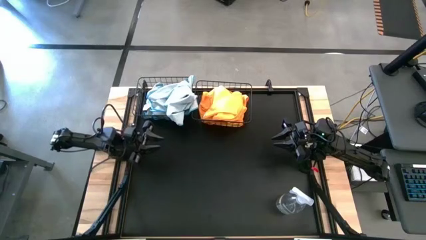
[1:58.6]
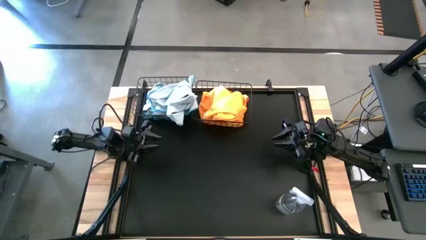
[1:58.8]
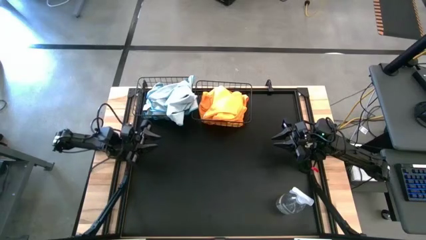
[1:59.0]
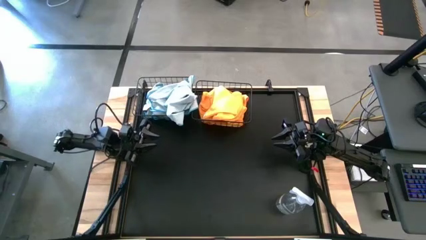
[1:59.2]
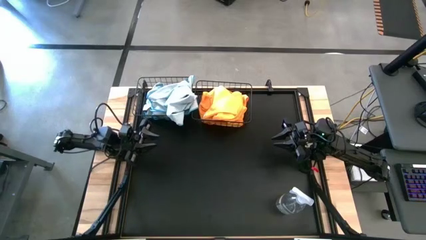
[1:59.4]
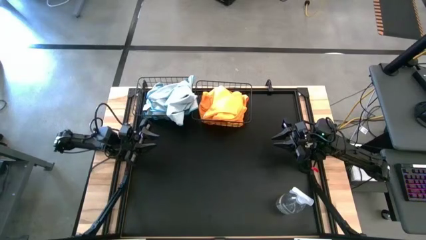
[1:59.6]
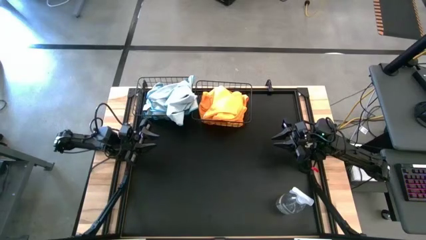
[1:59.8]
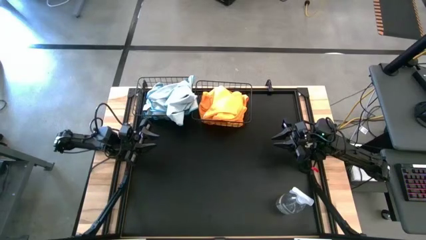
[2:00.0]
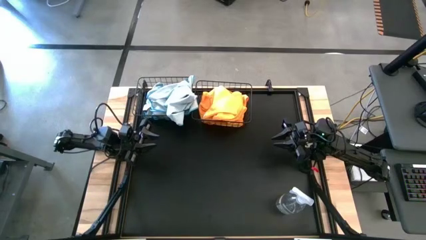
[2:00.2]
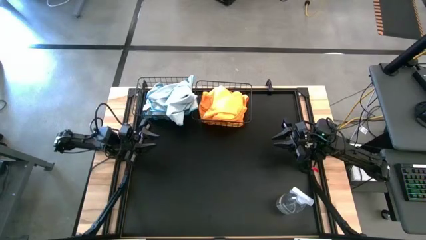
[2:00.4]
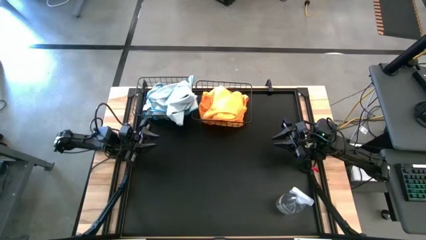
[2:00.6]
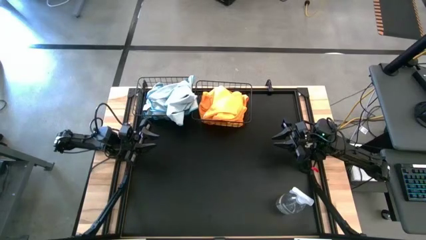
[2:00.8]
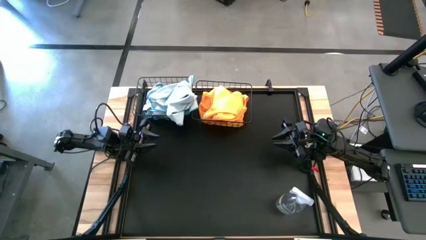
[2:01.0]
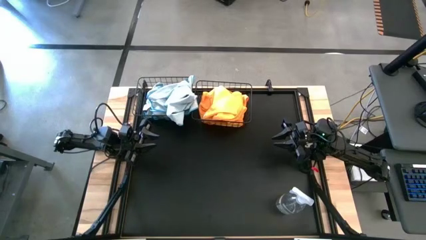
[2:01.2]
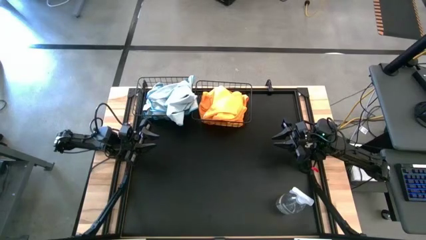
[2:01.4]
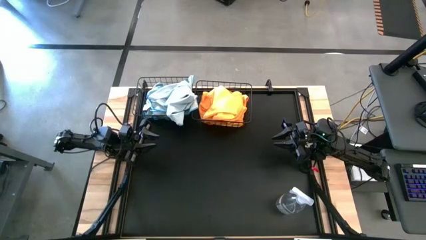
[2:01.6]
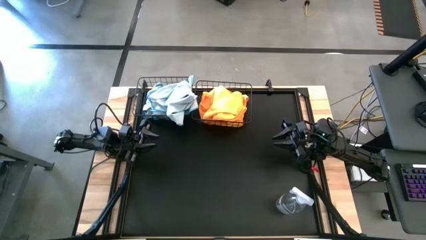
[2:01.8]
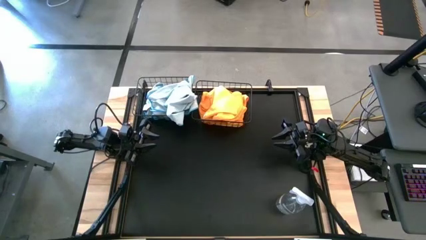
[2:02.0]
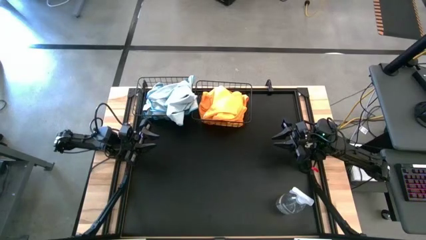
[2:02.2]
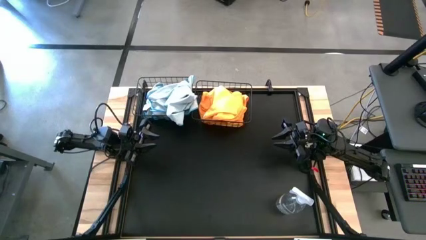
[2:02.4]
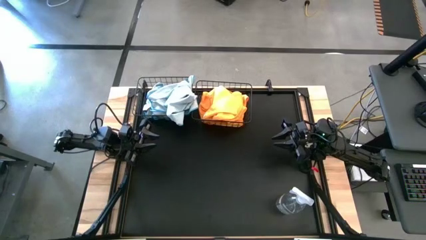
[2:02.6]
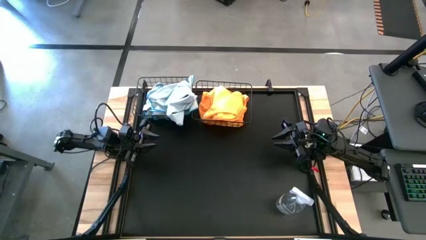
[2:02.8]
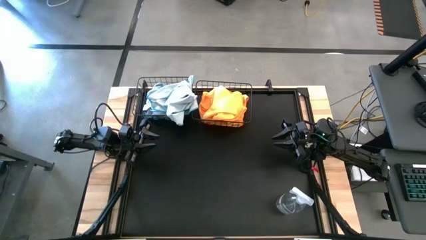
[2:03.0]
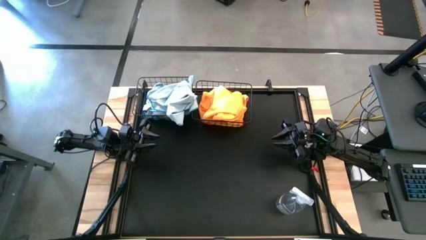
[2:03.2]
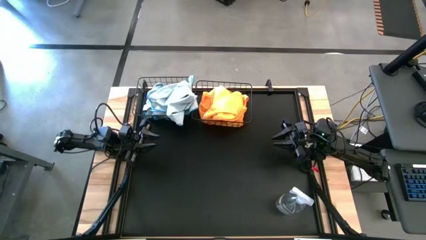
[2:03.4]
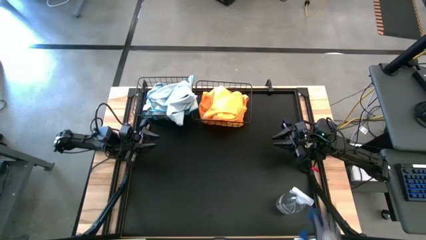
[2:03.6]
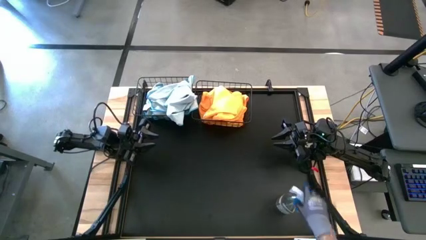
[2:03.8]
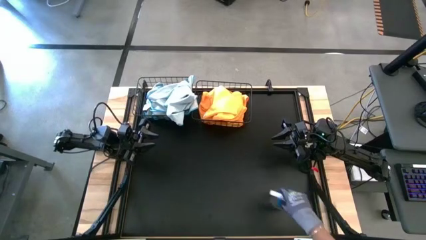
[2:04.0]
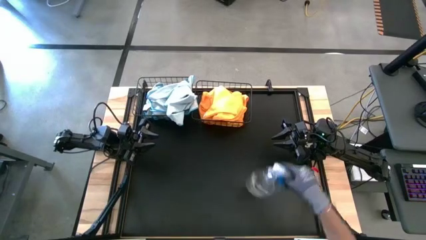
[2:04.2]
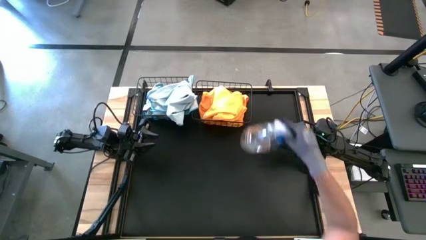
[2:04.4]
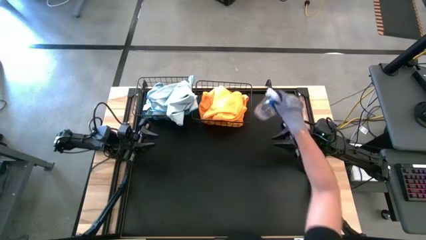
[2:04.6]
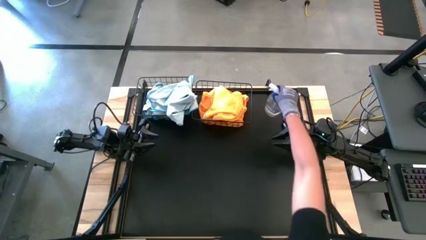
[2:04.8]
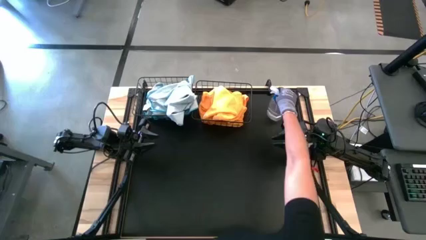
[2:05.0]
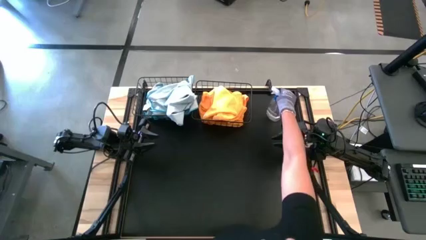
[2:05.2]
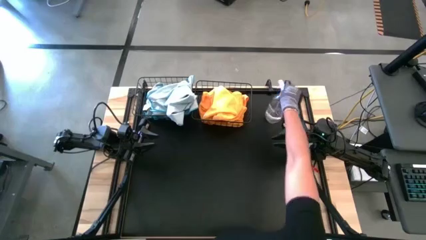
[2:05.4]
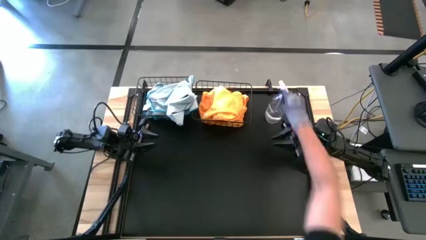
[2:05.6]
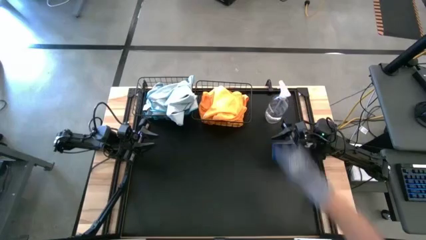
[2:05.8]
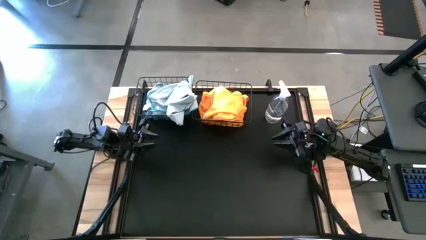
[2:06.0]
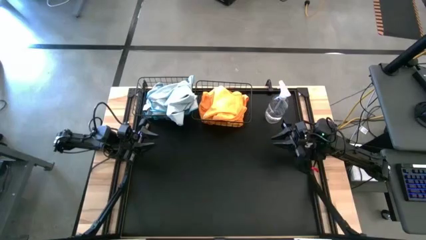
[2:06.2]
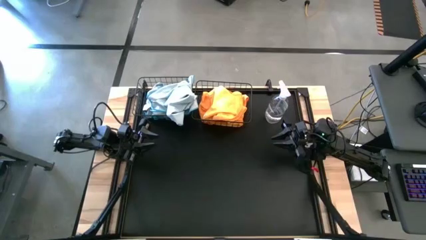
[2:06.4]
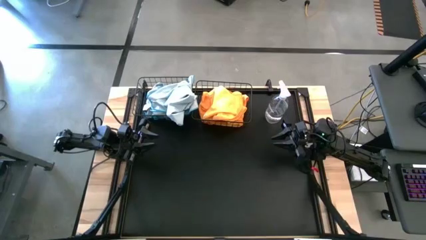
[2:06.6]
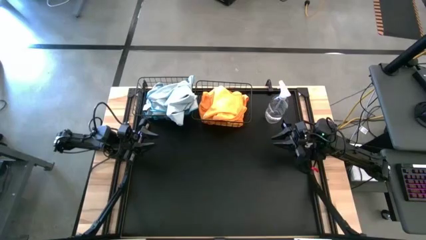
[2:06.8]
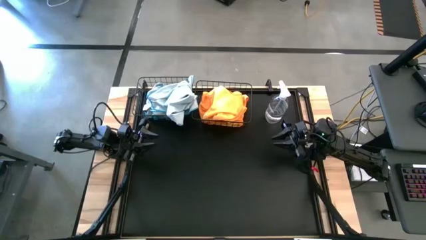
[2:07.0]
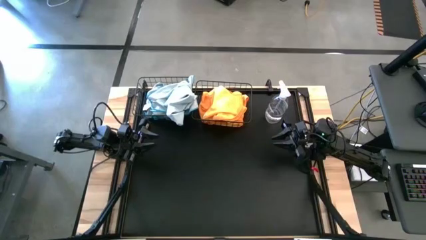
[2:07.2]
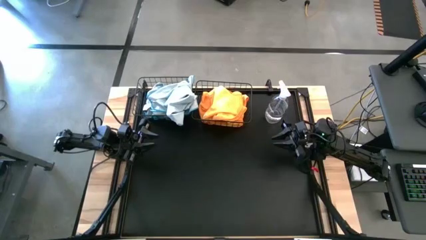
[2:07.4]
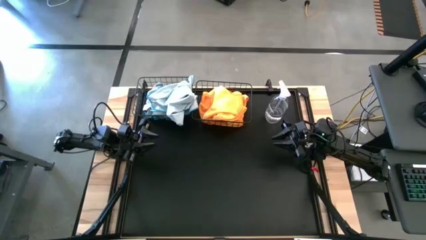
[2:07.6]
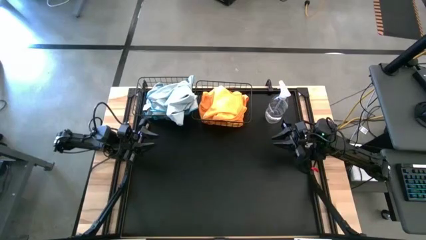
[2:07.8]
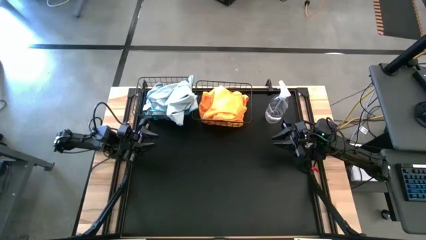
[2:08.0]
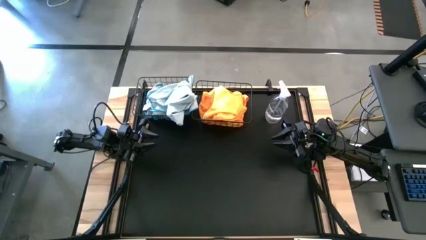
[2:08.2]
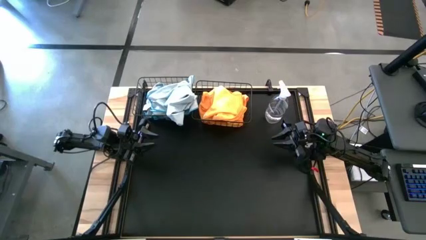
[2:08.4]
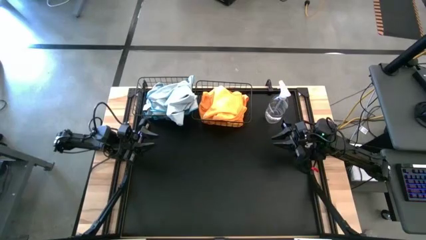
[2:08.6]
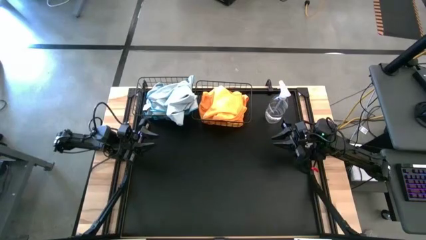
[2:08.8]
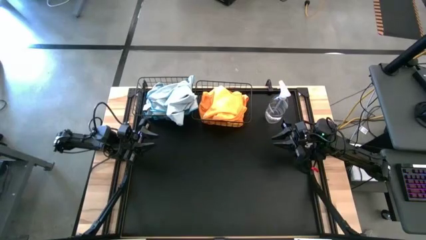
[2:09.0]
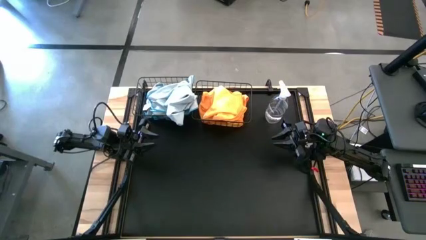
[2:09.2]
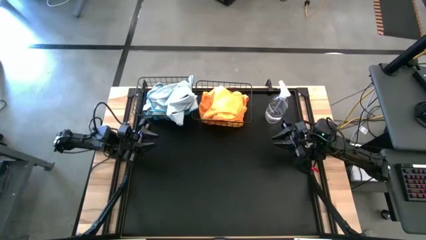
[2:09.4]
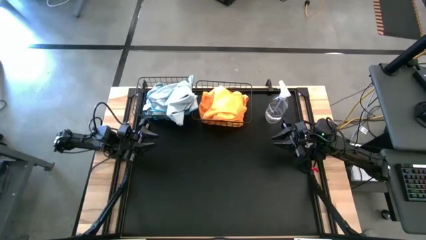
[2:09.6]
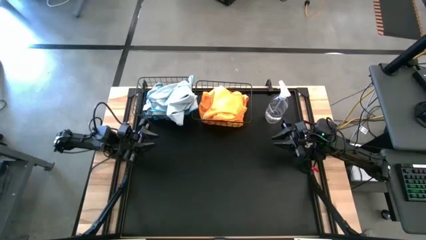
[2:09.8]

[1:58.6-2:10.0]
Task: Sort microfiber towel by color & place in baskets
Return to Home Position

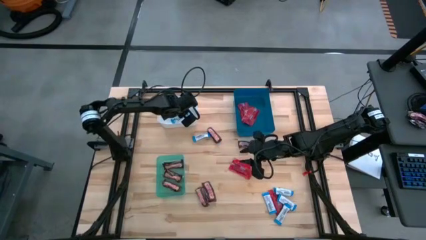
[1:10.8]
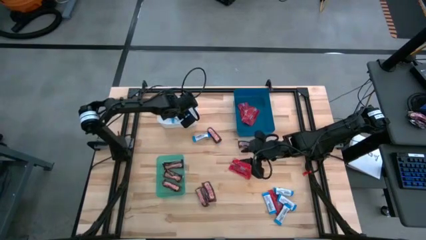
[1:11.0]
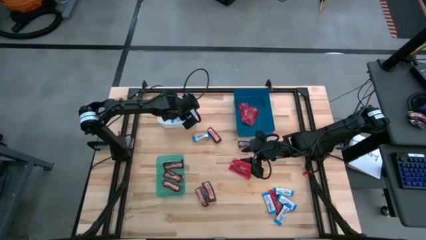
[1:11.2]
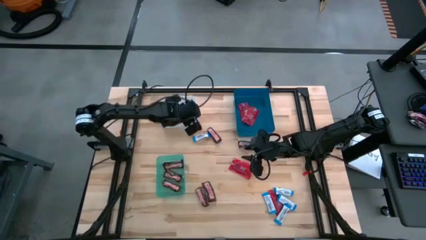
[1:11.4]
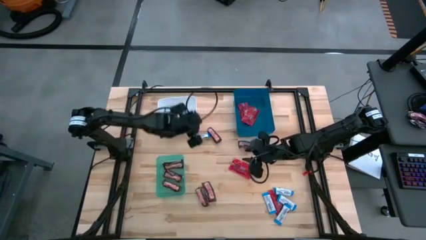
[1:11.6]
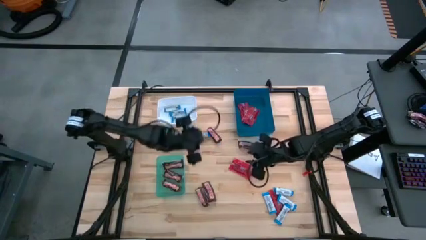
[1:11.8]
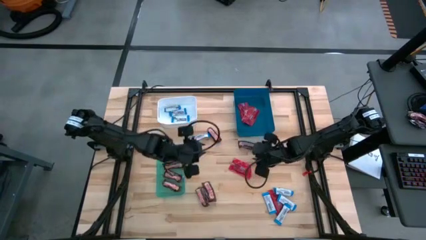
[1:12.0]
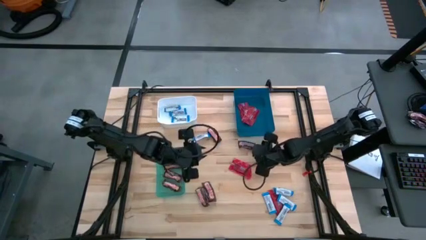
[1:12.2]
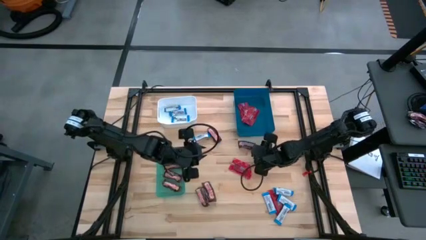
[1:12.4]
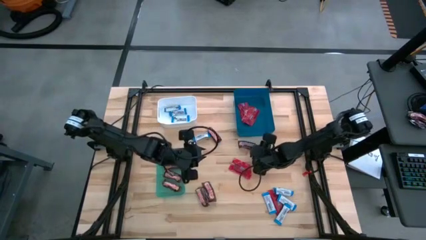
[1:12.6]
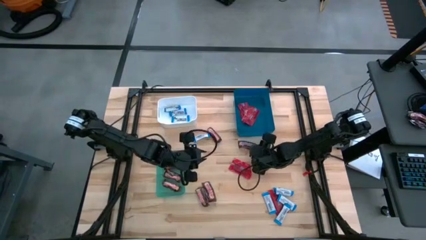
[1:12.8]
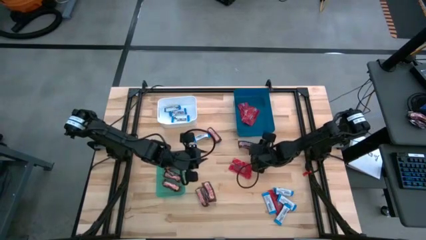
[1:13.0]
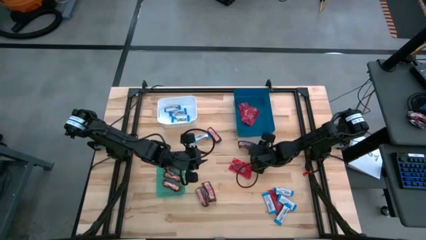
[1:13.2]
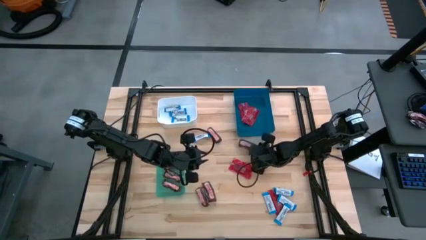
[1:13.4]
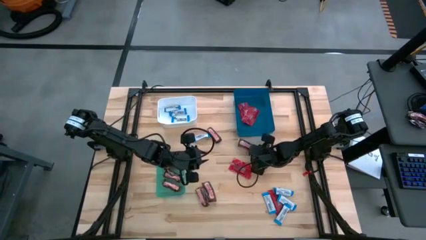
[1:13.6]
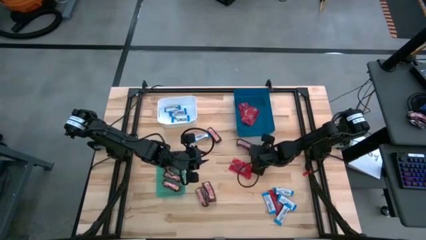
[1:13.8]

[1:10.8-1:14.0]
Task: Sort candy
Put the brown chocolate bar into the green bin
